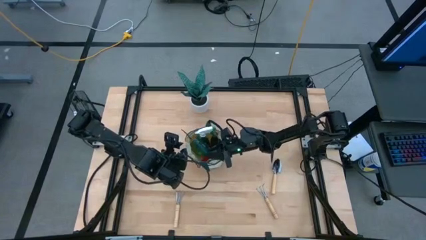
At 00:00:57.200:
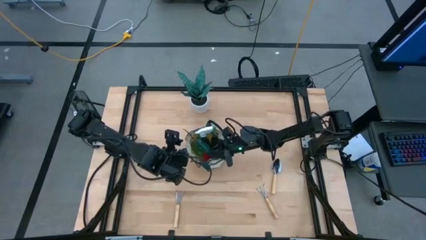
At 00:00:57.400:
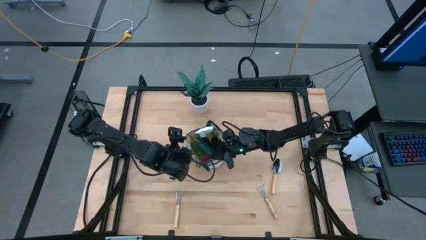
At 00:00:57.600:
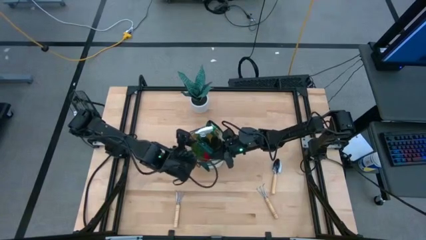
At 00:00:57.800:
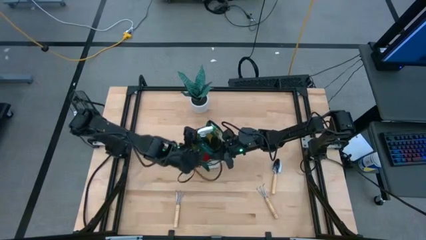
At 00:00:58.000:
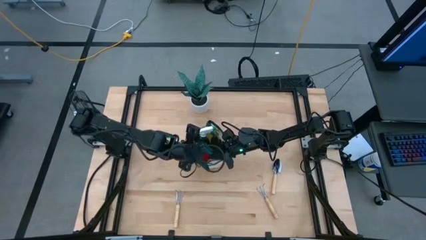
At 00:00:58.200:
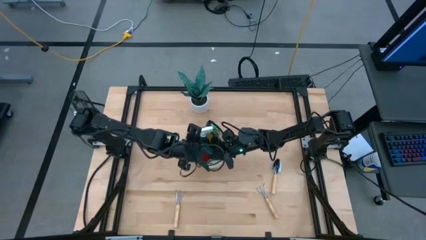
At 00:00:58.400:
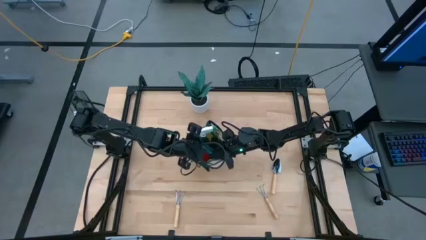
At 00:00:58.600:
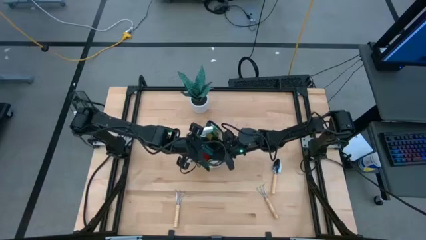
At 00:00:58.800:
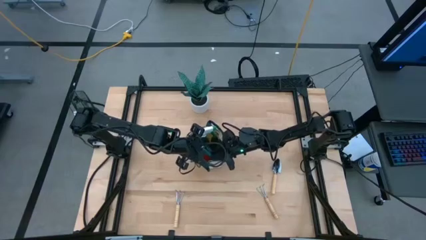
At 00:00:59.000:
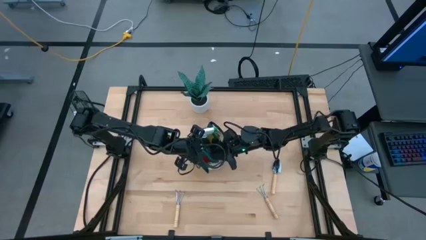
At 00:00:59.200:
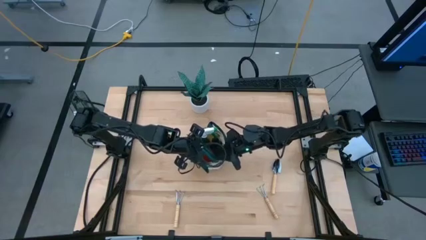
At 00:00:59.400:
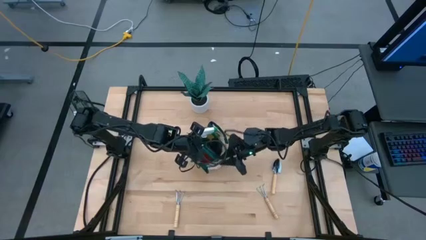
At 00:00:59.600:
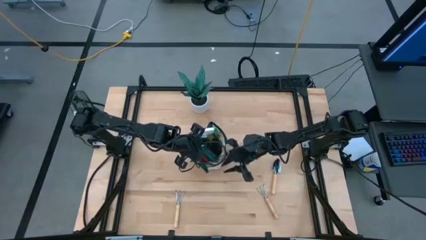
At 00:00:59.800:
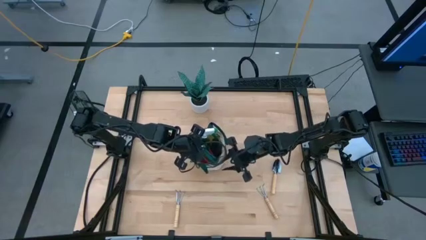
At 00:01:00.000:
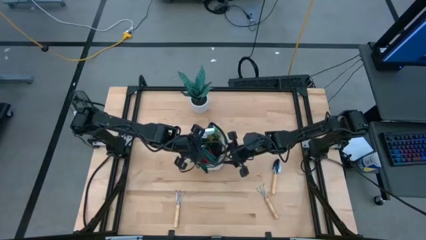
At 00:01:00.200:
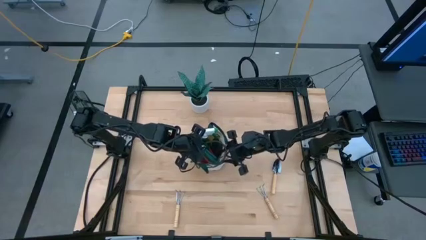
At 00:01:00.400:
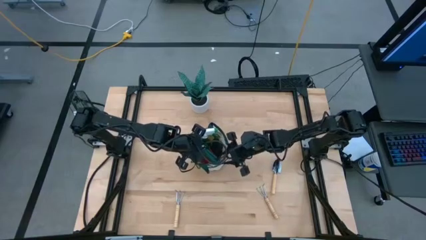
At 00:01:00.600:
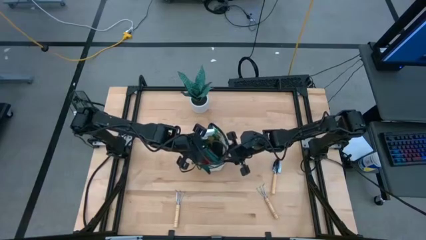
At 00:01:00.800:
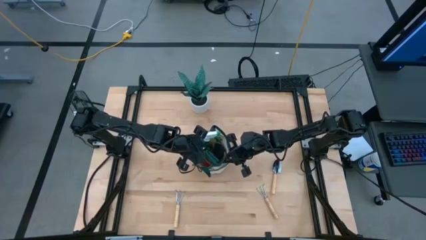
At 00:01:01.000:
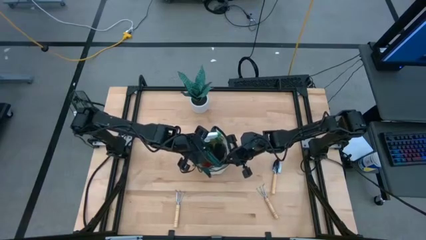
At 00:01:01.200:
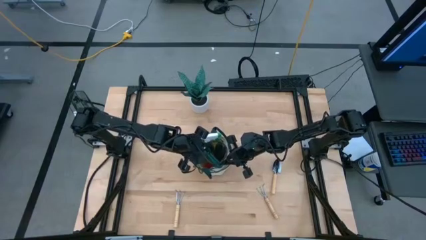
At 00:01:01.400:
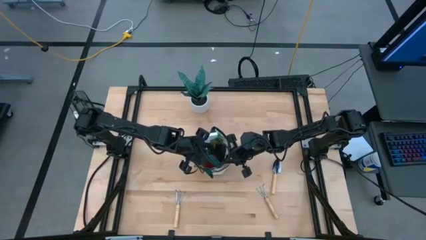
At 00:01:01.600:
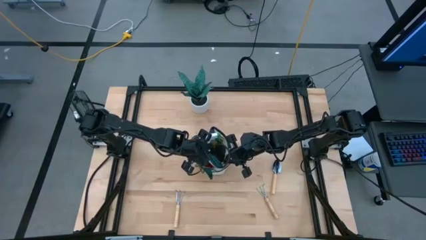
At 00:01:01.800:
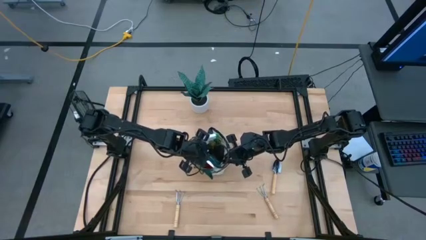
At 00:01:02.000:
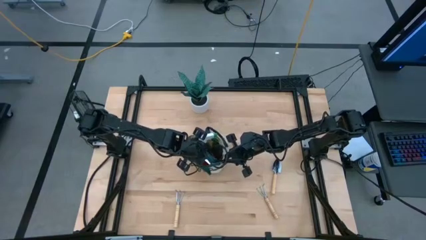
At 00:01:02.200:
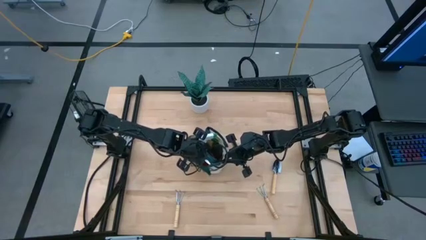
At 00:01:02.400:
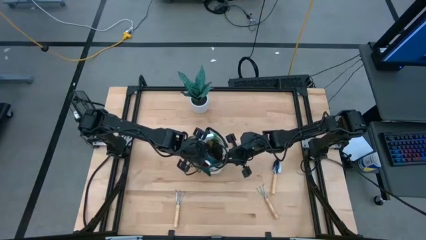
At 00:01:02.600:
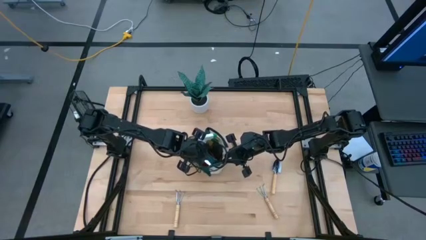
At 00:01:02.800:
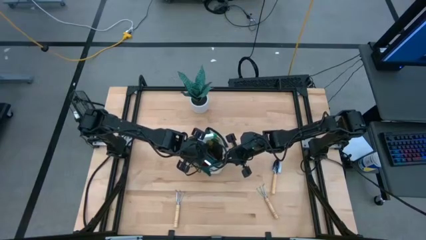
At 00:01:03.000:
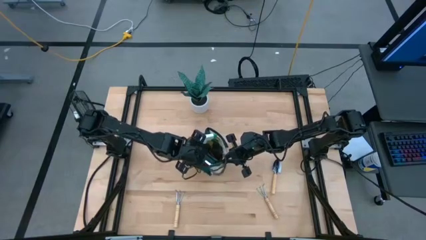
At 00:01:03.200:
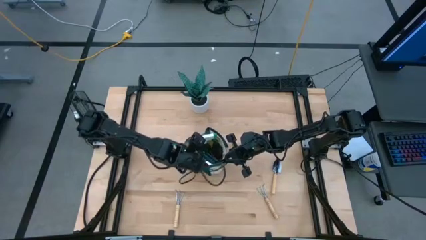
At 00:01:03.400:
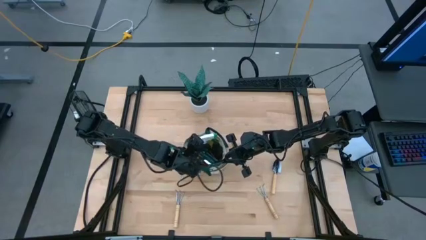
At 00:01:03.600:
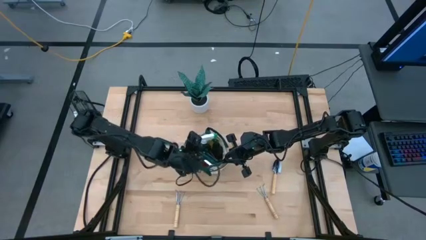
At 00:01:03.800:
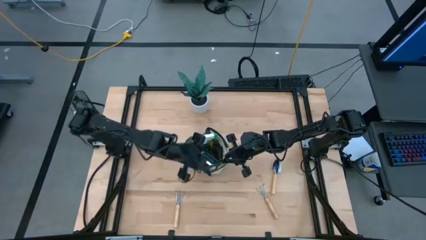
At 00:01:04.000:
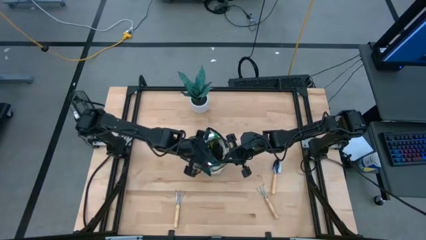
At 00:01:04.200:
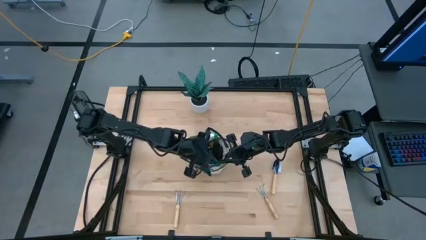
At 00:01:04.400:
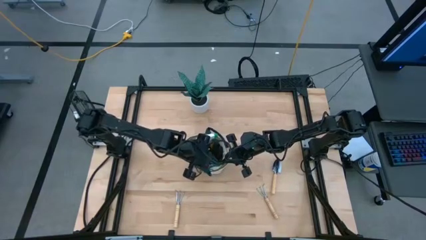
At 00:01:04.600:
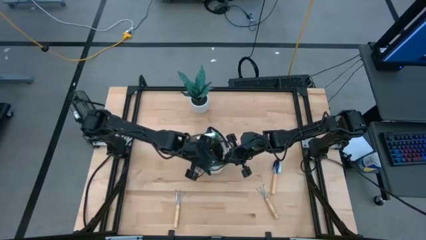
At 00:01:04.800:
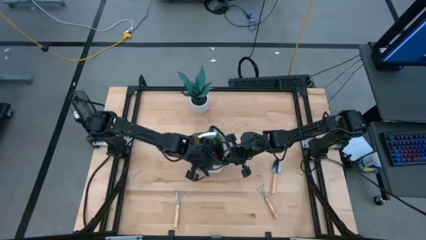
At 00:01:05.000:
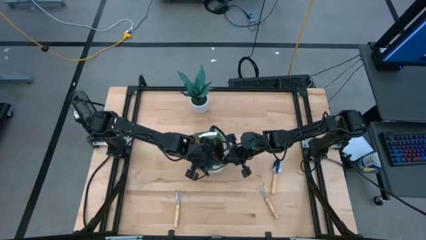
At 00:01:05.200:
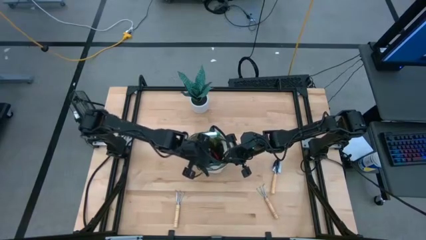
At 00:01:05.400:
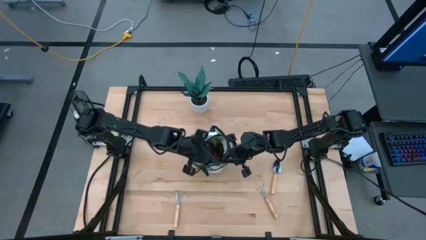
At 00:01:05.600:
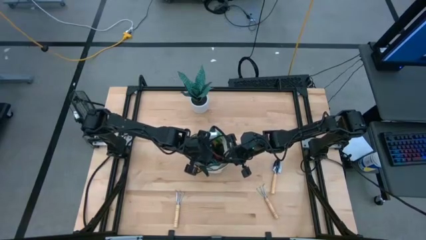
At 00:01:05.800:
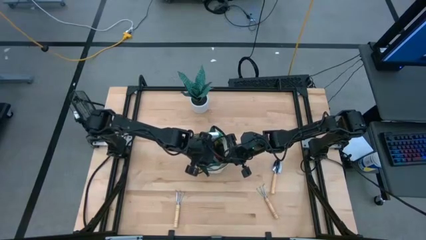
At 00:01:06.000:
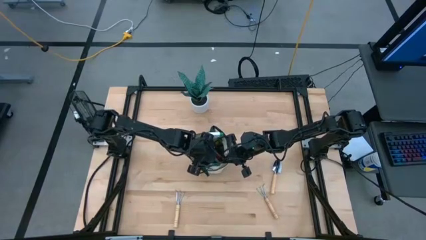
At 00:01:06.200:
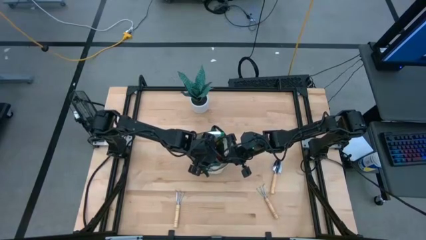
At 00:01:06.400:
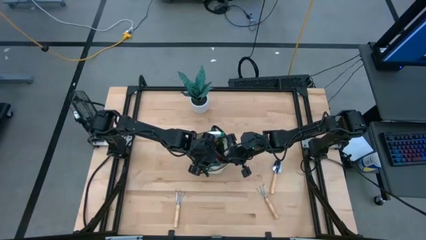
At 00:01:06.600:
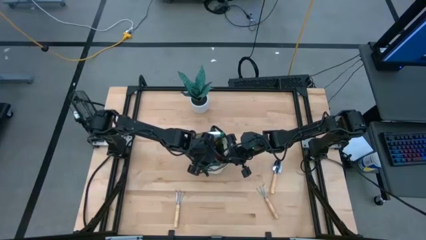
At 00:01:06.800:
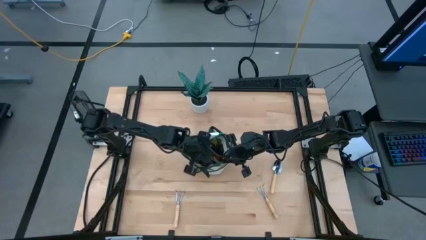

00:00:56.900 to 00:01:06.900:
Task: Pick & Place Garden tools in Gardening bag
Put the green shear scissors into the gardening bag

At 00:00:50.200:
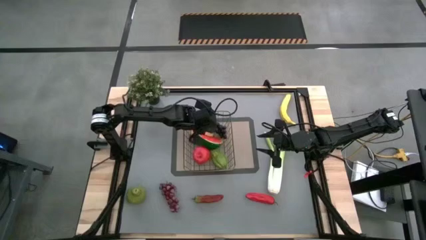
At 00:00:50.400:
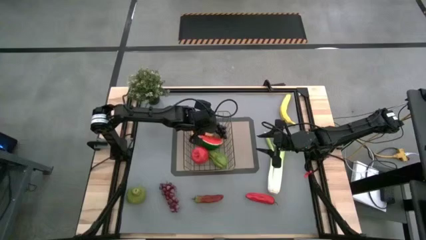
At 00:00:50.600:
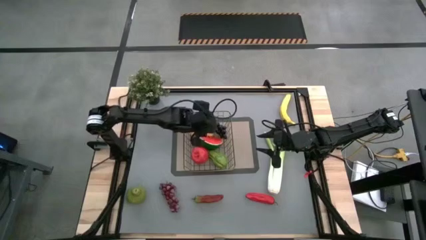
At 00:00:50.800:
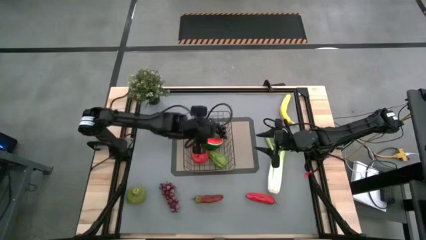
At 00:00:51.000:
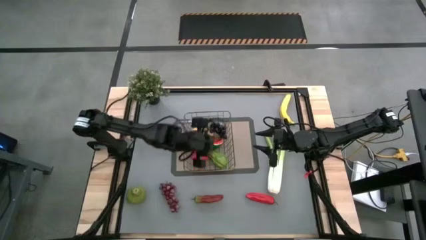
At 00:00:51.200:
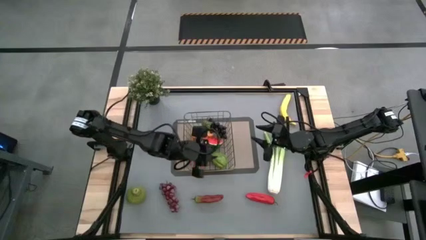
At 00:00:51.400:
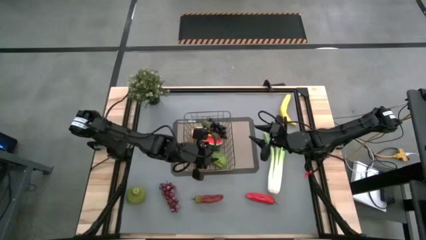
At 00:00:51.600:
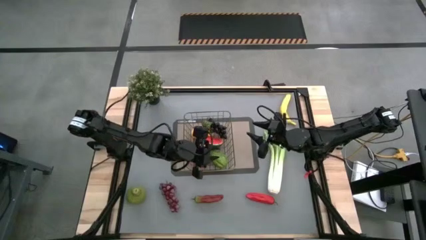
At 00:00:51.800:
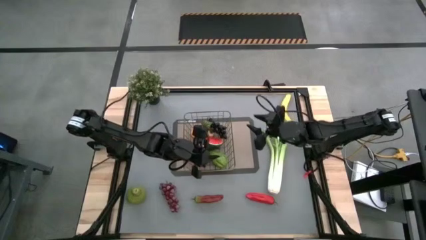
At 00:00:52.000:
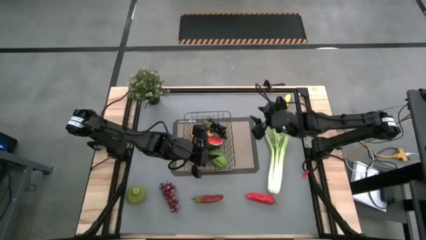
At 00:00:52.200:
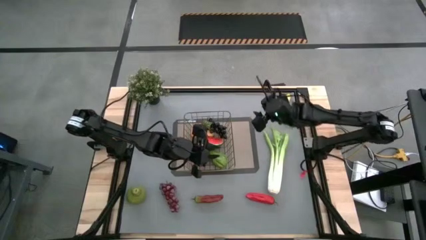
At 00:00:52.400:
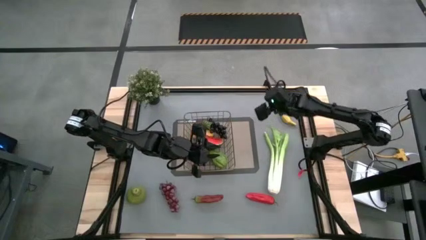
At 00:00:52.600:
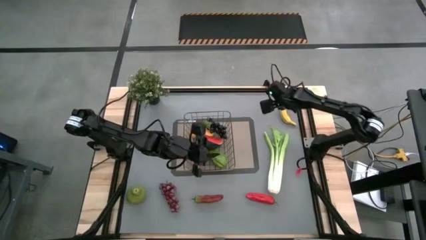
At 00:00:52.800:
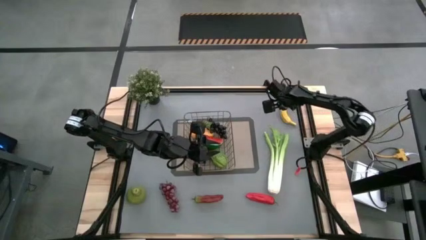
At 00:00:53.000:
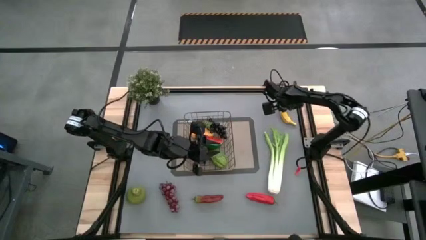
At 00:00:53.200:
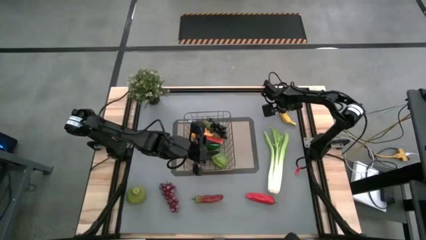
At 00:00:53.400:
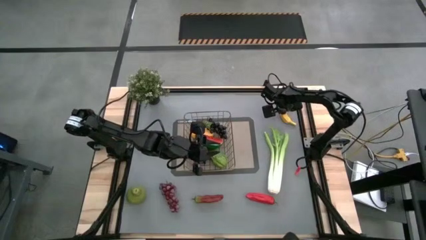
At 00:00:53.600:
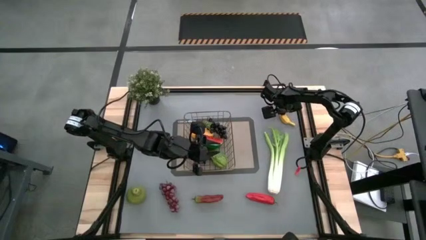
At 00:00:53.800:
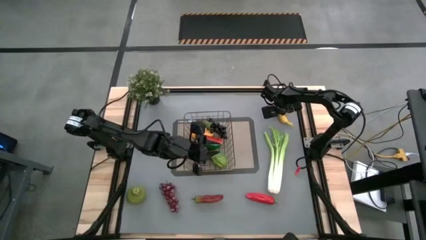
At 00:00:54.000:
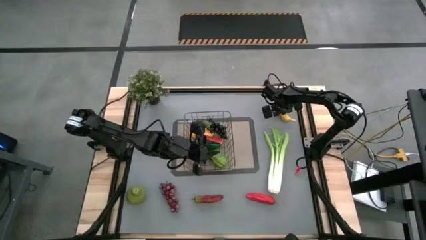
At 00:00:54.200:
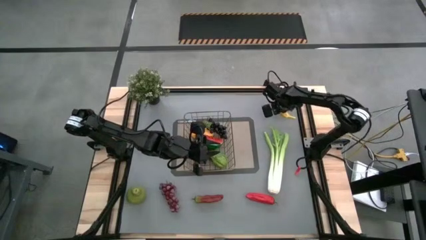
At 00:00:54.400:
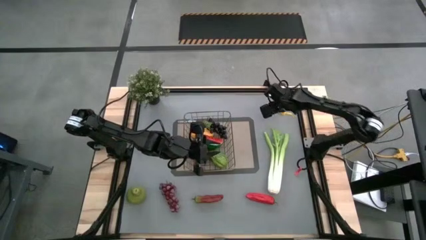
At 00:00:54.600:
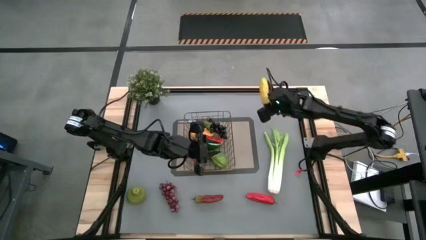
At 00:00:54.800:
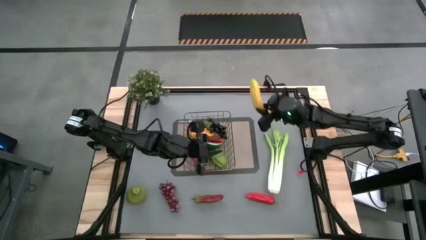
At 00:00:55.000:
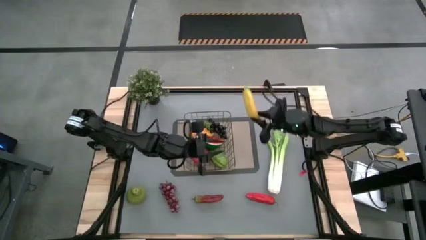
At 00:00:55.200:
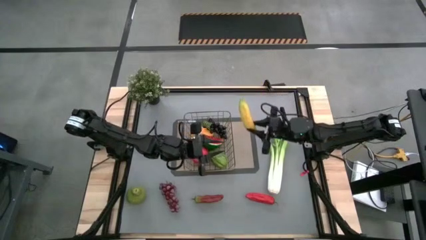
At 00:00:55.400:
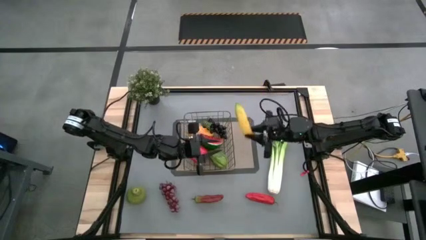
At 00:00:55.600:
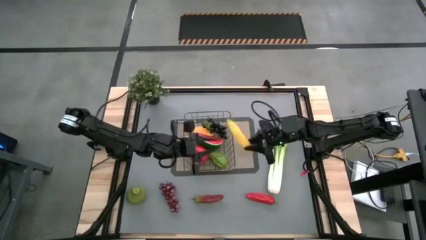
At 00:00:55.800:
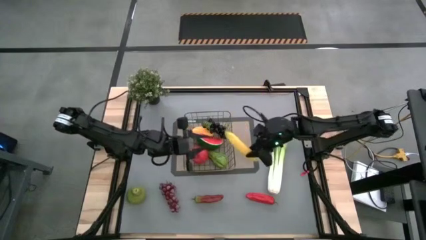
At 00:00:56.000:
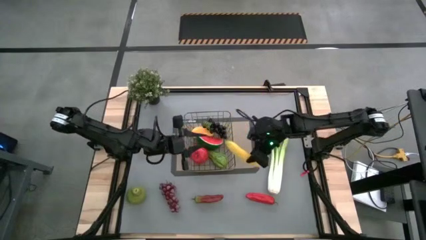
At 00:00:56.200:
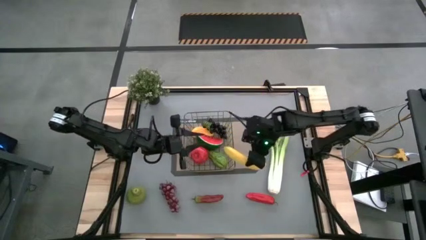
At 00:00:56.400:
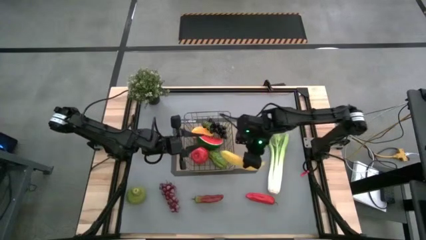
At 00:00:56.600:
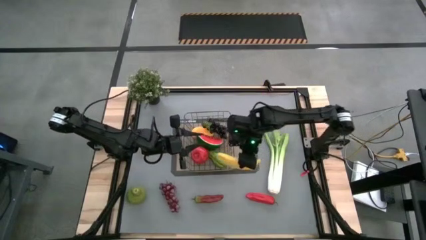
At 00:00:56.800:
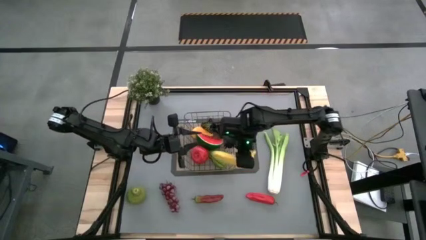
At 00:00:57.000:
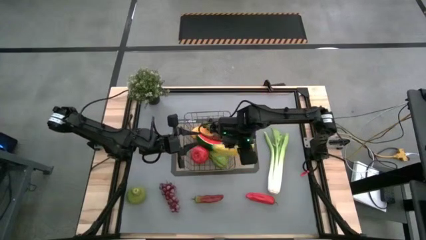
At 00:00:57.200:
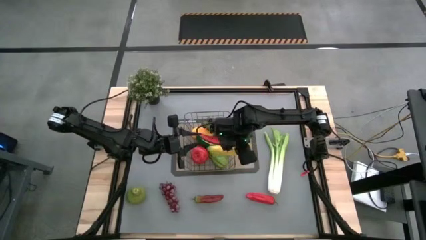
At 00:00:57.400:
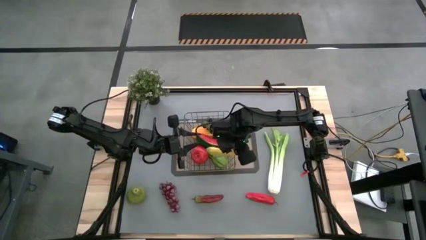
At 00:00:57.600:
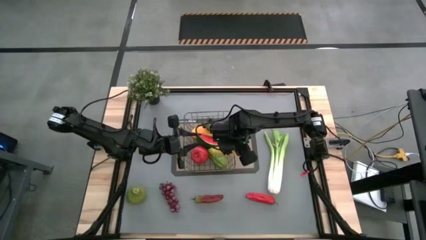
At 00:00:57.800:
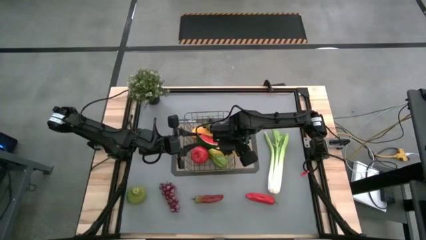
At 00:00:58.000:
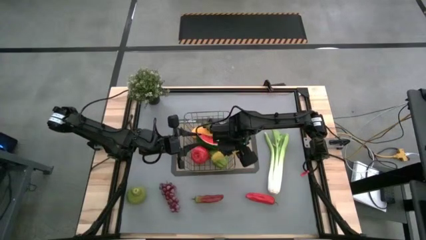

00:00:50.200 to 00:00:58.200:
Task: Build produce basket
Put the yellow banana into the wire basket
